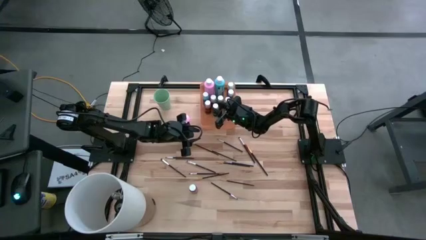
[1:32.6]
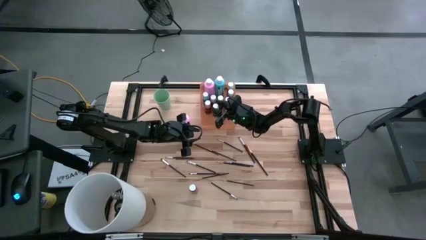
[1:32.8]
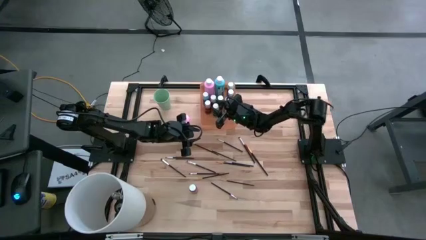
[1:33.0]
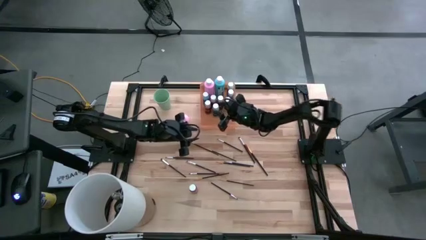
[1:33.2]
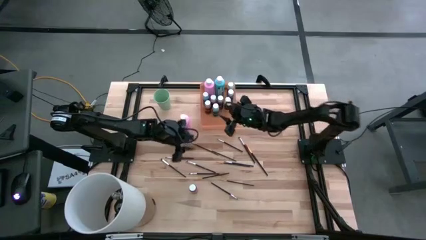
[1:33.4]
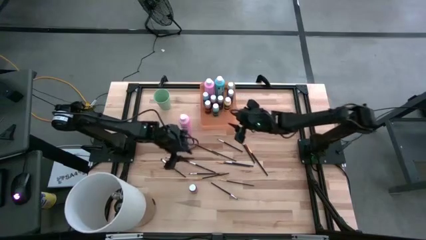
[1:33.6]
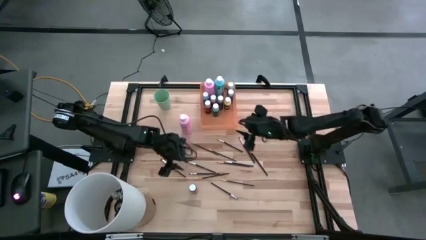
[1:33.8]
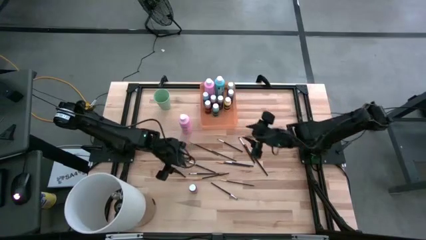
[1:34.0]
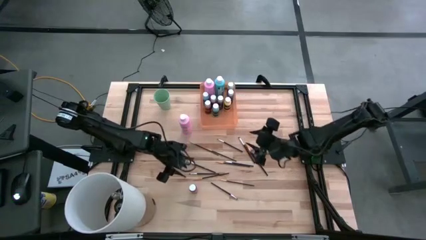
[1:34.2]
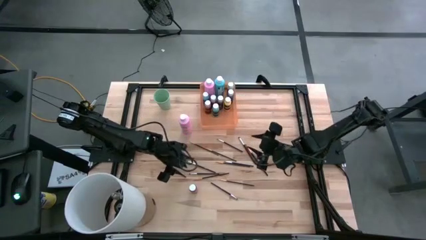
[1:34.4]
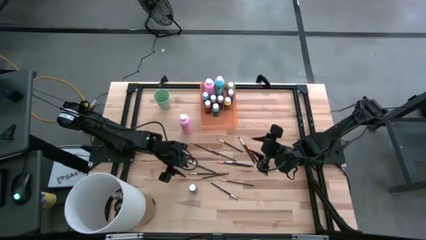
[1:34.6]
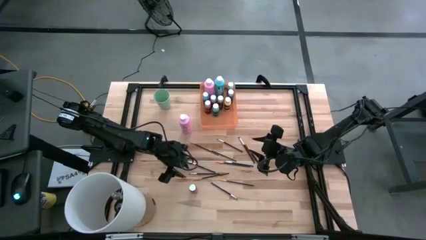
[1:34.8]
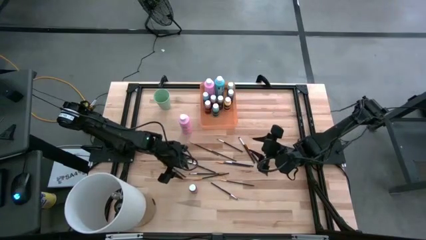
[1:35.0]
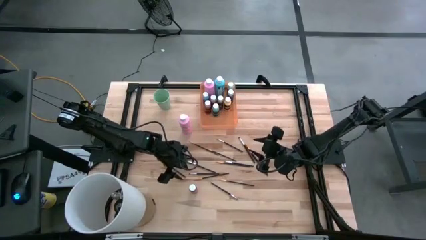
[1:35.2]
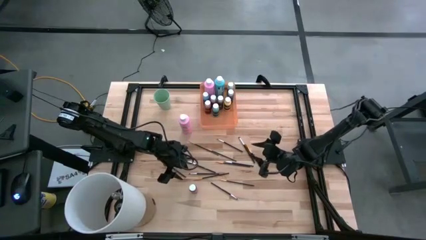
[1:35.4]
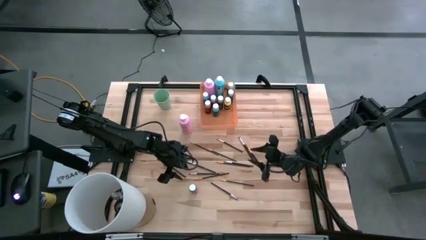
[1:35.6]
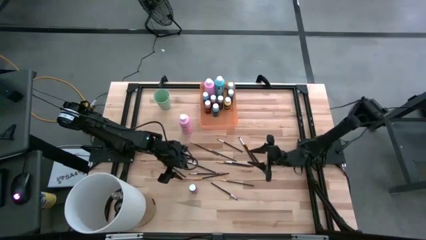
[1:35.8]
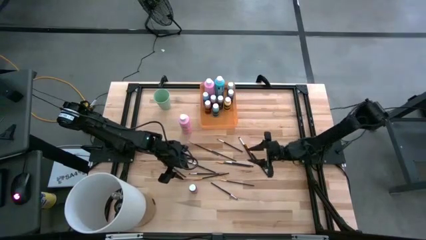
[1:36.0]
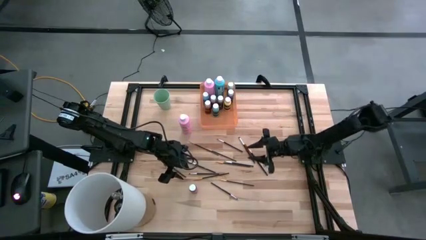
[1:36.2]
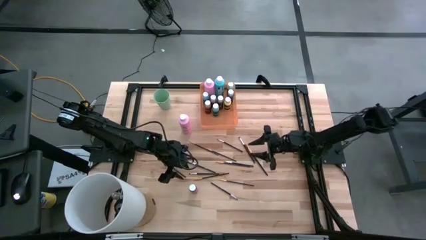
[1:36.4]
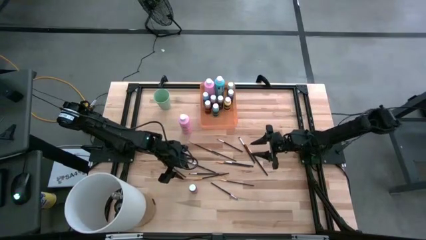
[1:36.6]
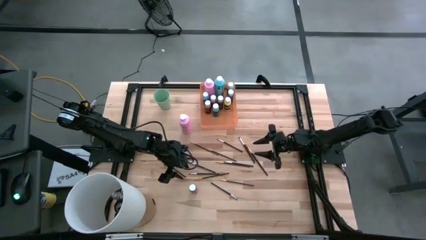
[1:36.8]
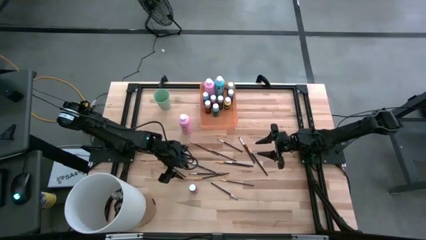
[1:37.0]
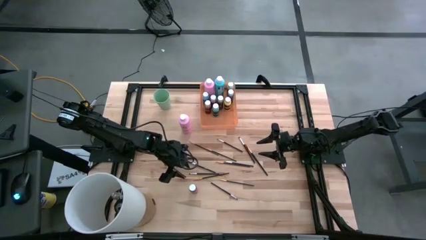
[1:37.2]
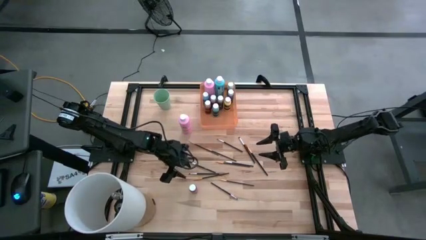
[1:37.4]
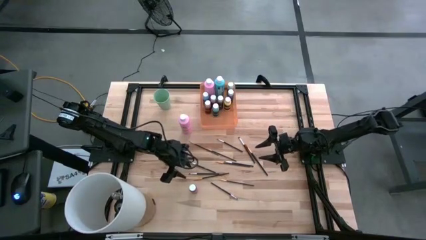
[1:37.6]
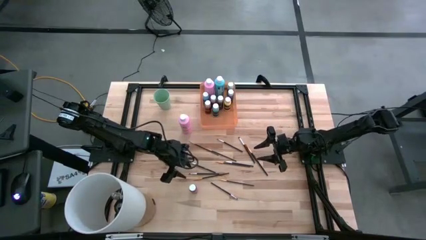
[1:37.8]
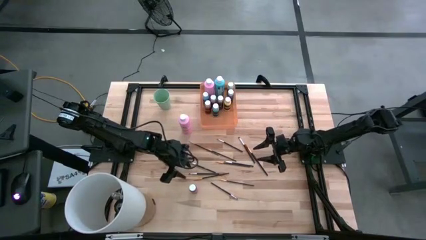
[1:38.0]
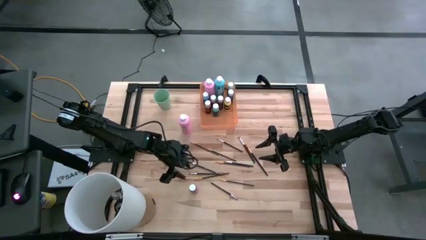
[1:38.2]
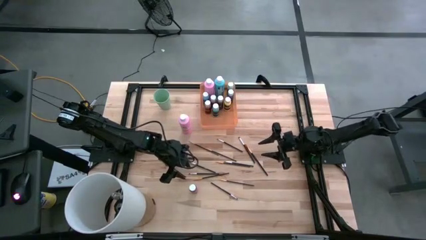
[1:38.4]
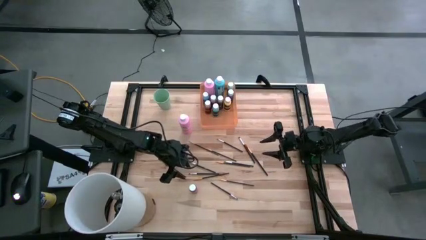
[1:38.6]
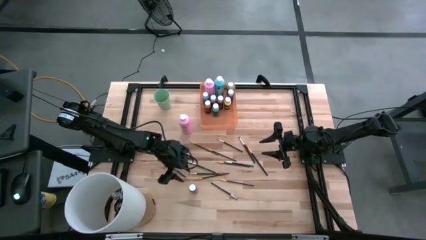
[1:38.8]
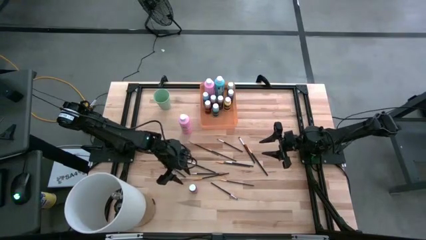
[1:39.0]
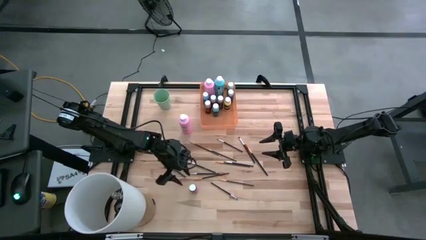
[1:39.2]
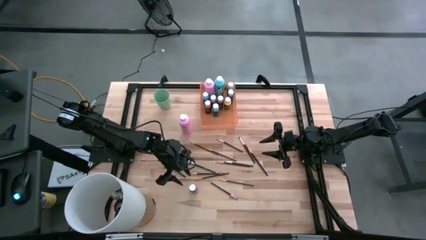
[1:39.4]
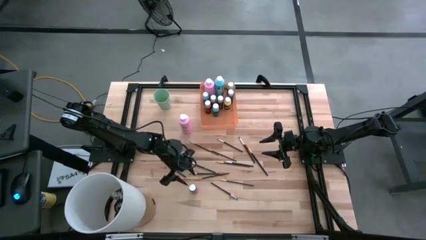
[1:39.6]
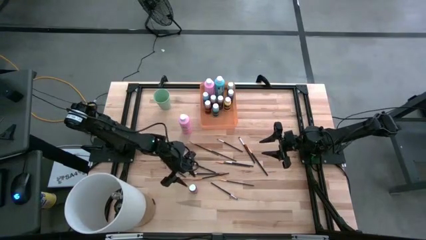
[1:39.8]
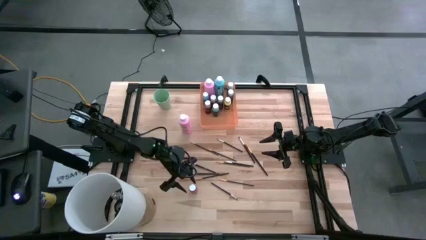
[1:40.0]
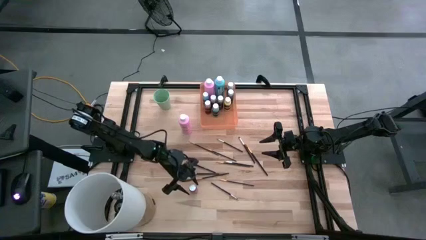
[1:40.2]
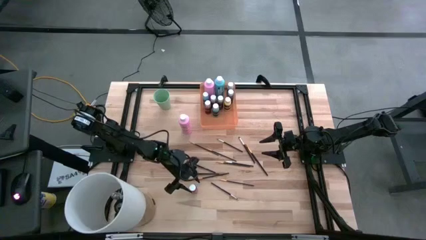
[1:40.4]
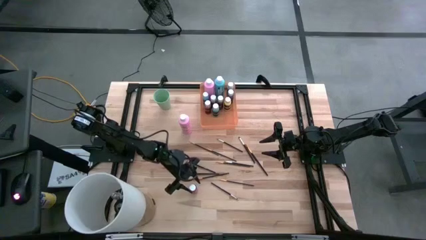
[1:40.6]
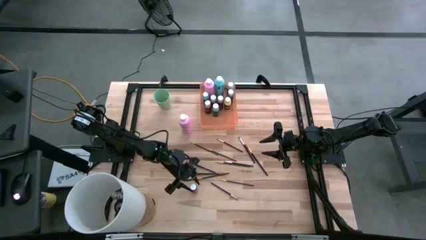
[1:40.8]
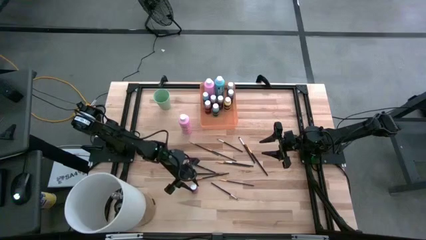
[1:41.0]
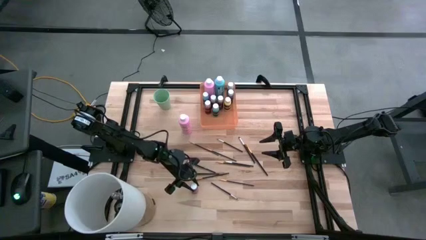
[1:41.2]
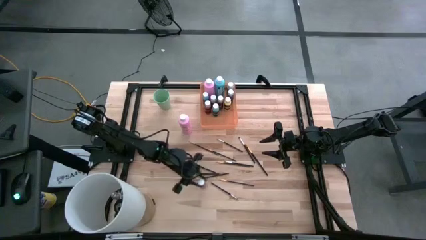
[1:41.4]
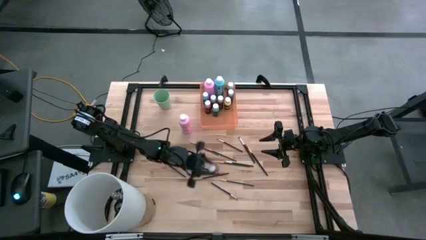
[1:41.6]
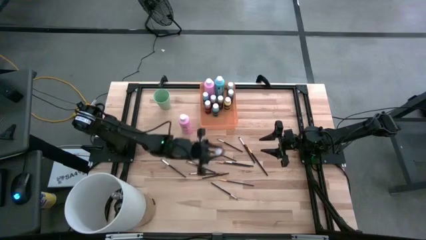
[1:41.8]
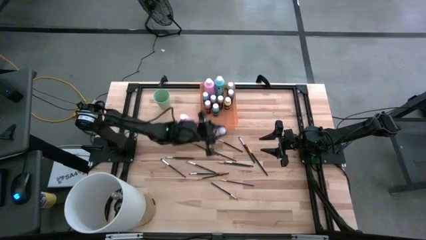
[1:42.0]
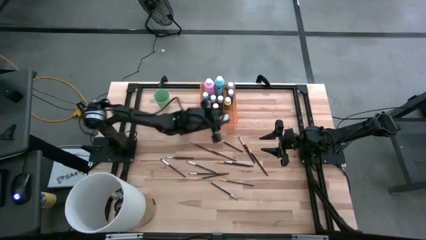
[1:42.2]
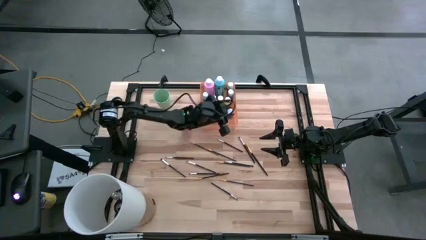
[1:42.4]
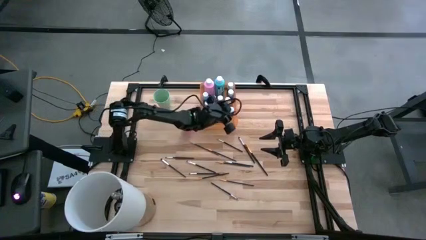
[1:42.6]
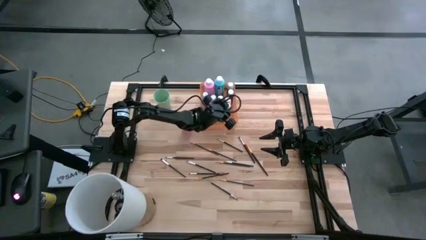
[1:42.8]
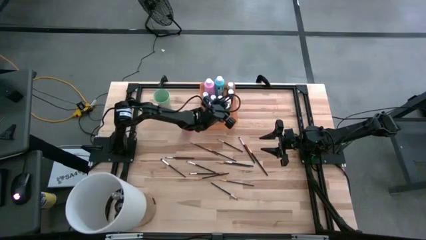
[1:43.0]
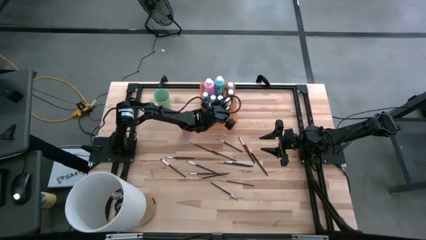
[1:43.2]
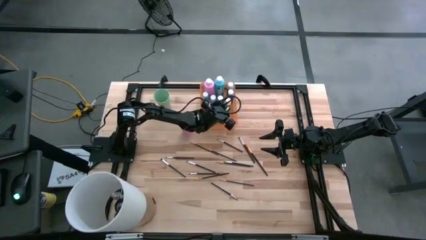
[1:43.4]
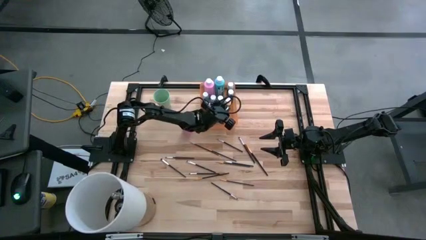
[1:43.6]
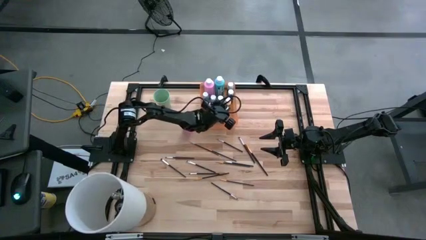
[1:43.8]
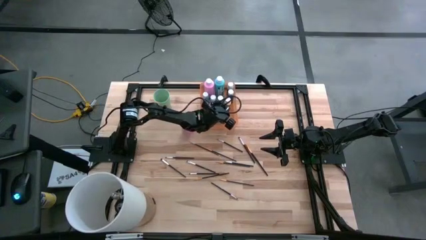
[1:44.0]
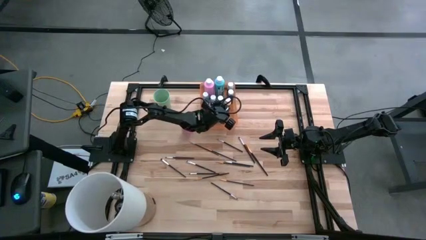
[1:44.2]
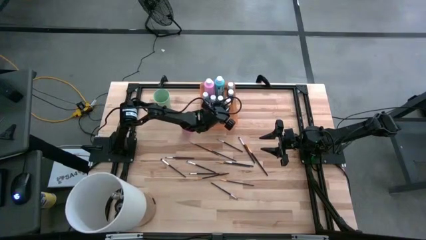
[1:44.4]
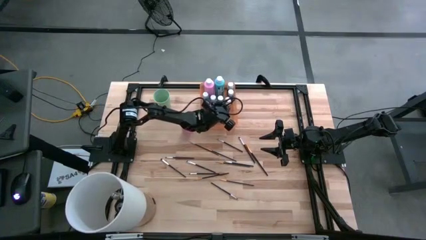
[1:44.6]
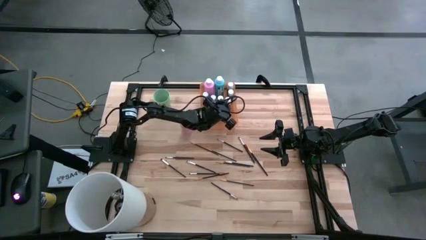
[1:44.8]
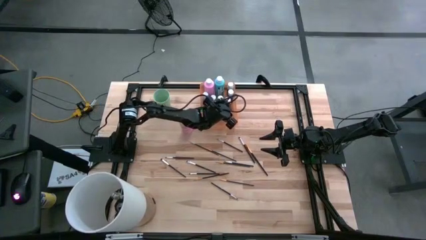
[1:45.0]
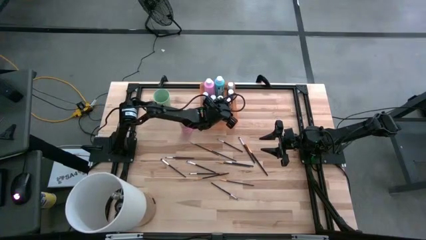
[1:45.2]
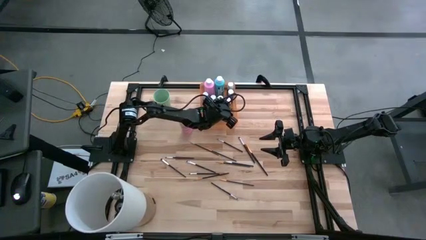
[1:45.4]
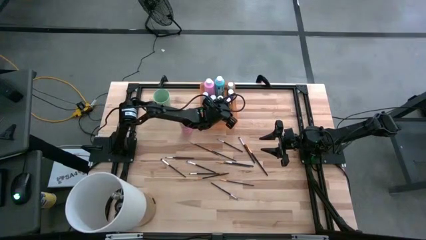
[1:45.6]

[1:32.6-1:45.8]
Task: Pick & Place Paint Supplies
Put the pink paint bottle into the orange bin
